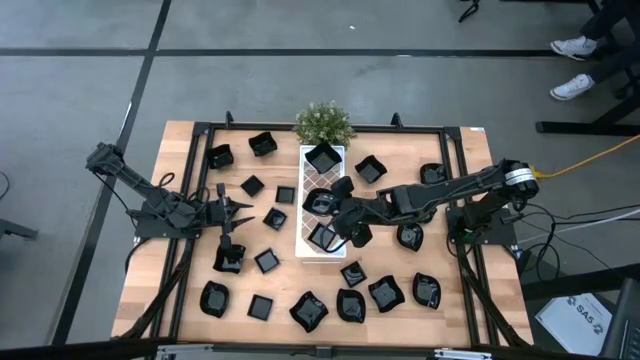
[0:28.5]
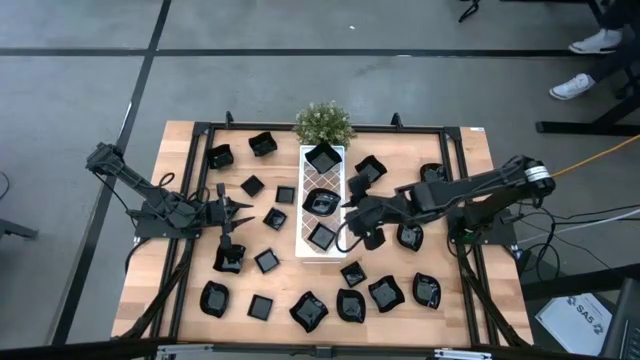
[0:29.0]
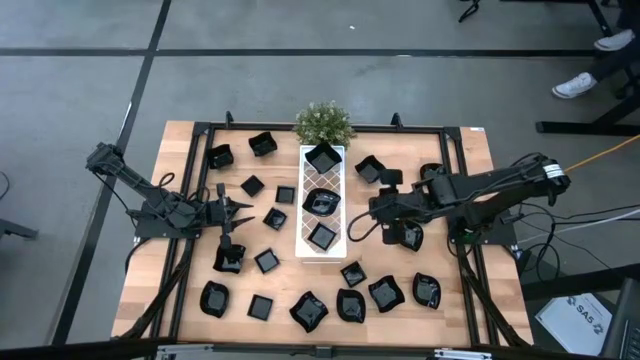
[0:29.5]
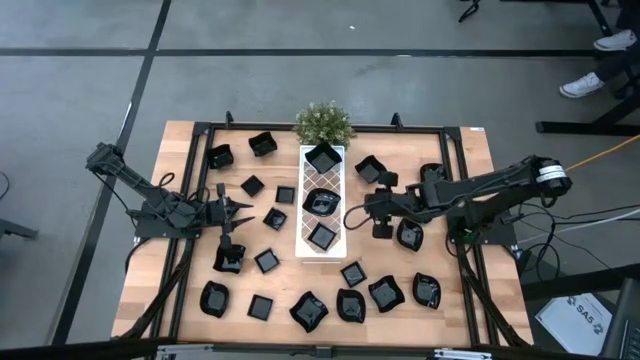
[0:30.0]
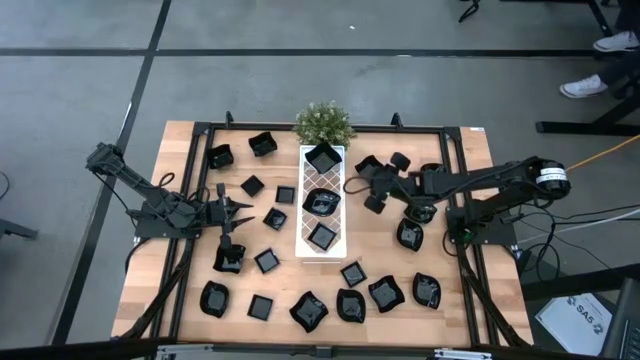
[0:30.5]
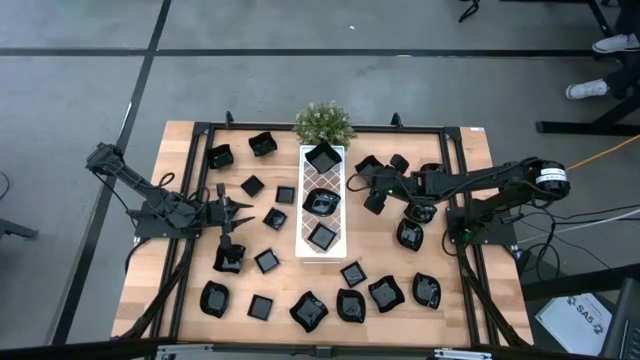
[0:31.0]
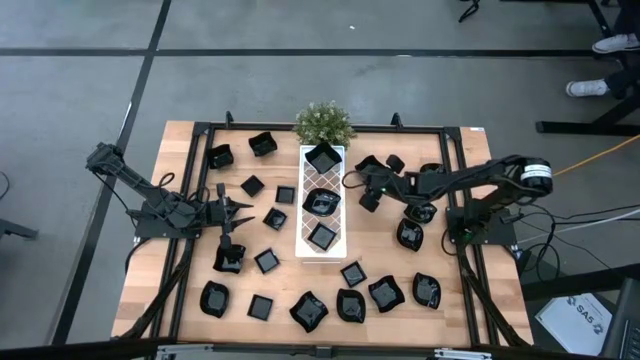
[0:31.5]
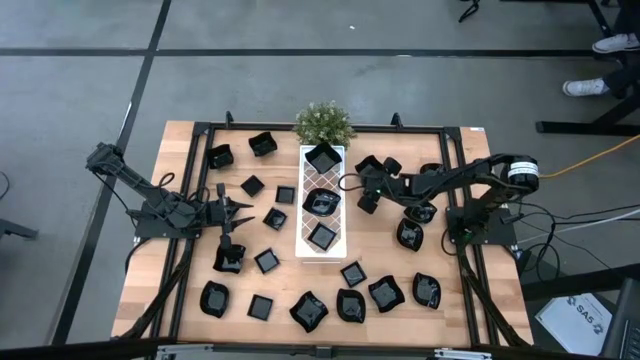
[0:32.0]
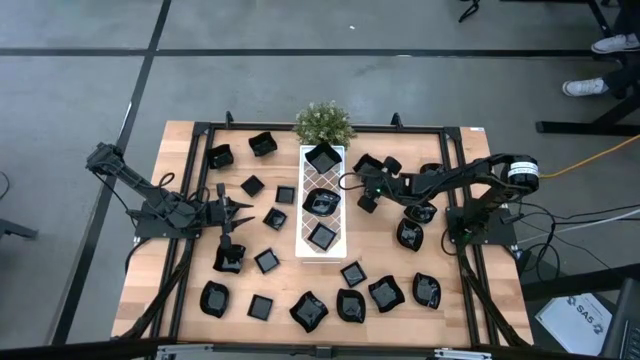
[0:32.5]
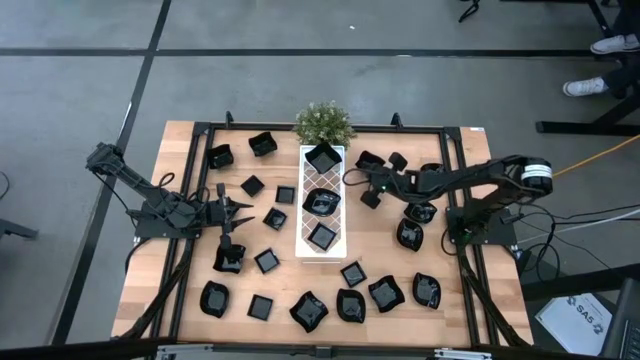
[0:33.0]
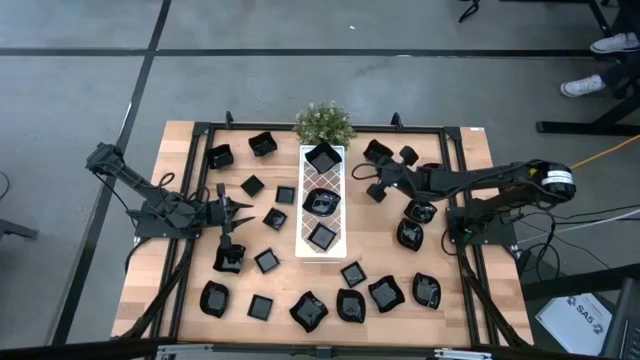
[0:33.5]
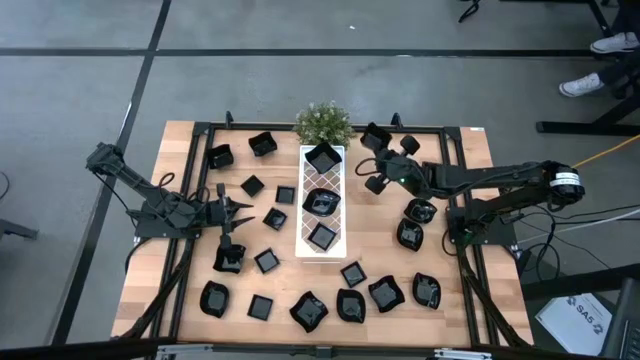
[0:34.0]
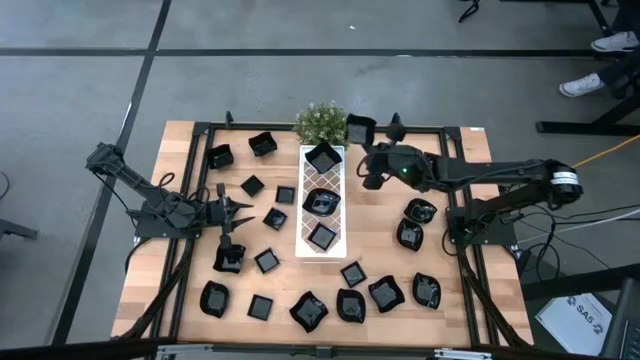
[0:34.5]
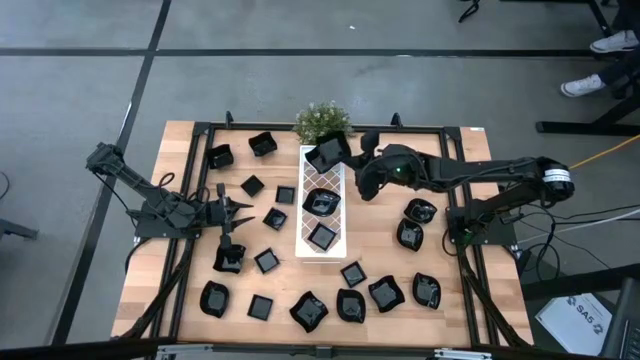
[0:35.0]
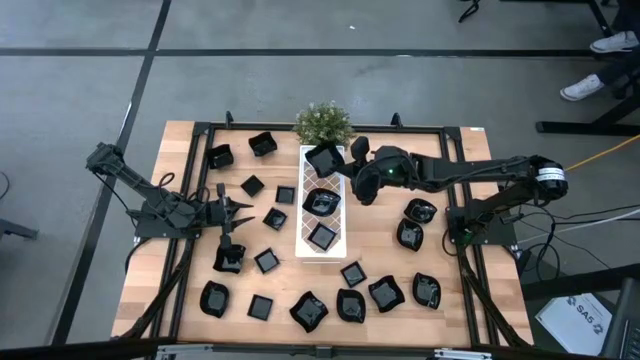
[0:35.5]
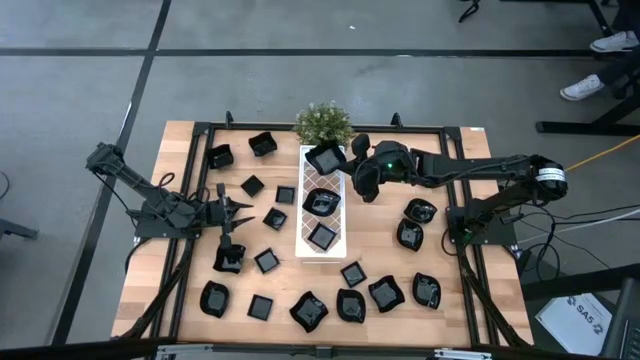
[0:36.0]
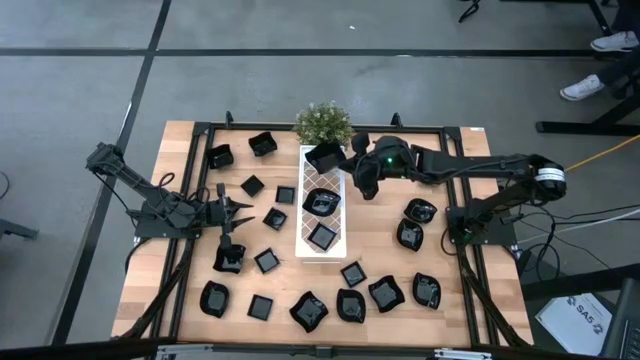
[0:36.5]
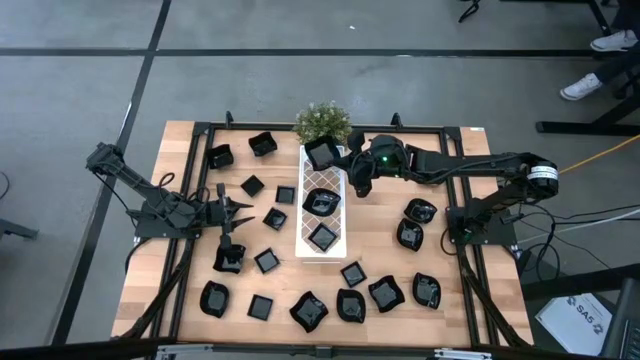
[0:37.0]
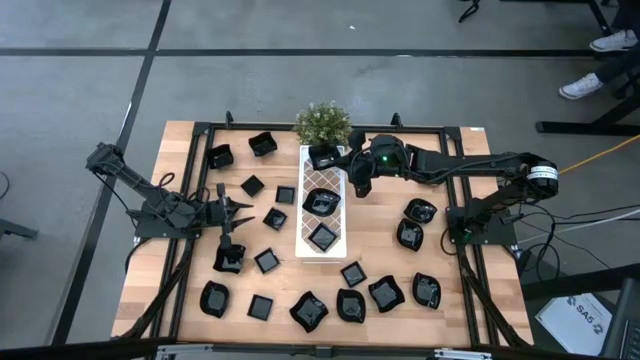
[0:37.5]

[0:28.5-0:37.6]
Task: Pick & Place Mini shaped plates
Stack the distorted square plate on top of the distorted square plate on the shelf

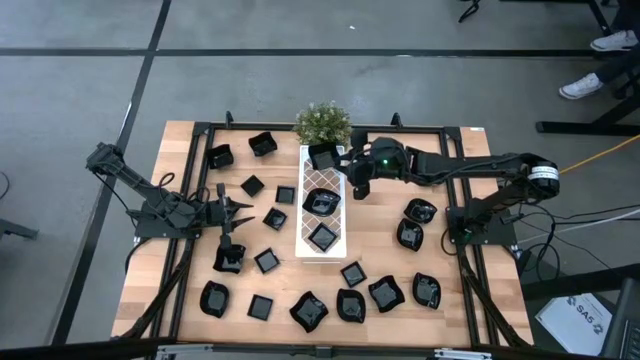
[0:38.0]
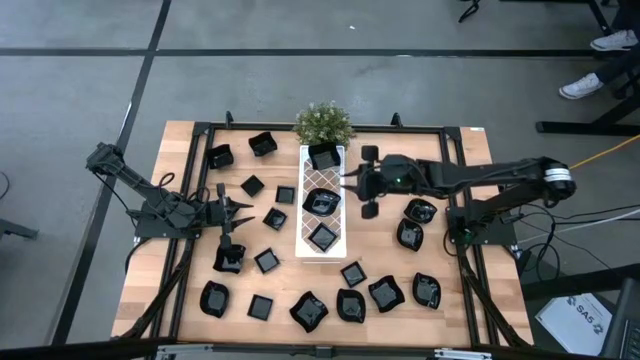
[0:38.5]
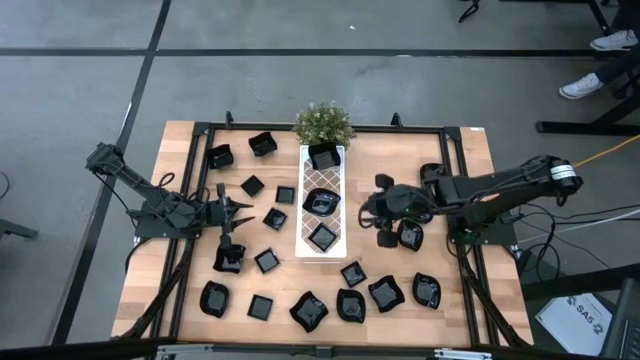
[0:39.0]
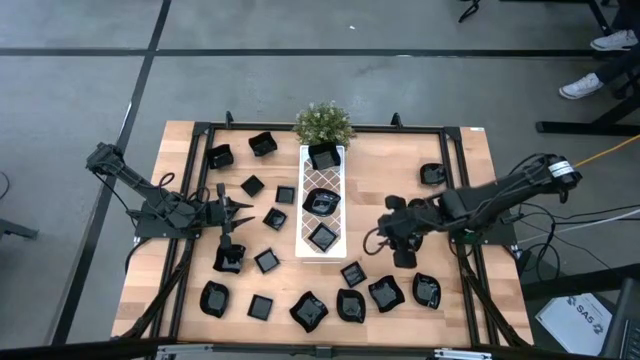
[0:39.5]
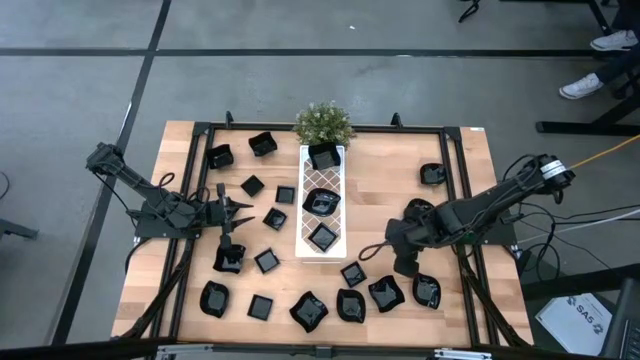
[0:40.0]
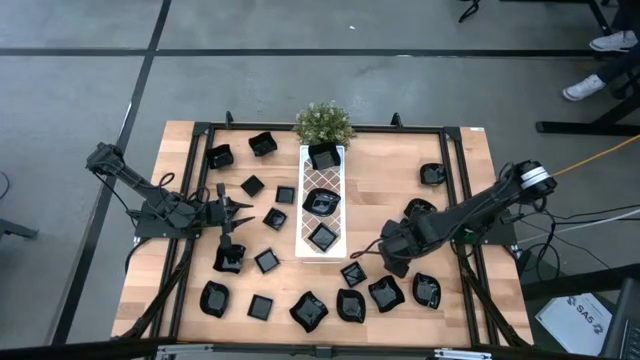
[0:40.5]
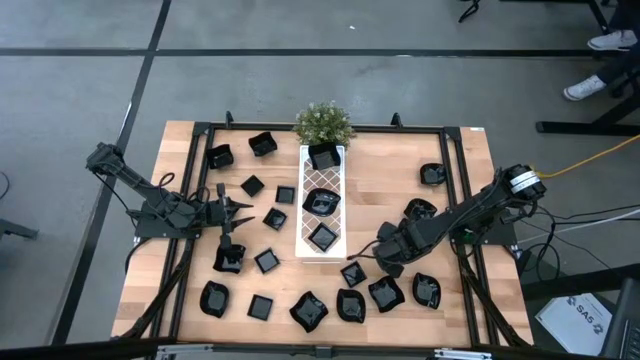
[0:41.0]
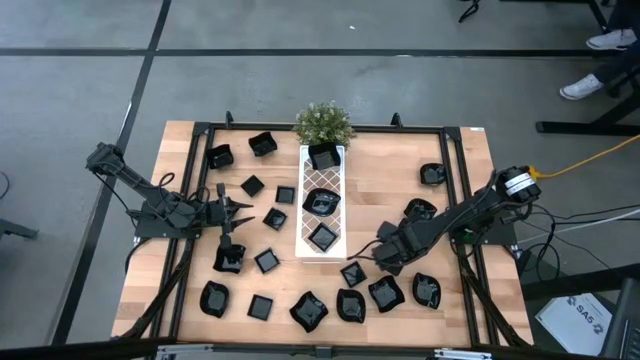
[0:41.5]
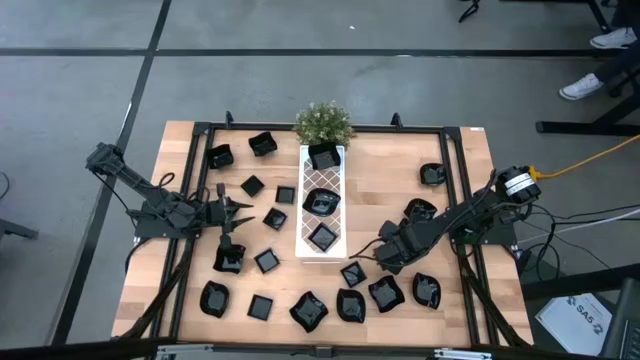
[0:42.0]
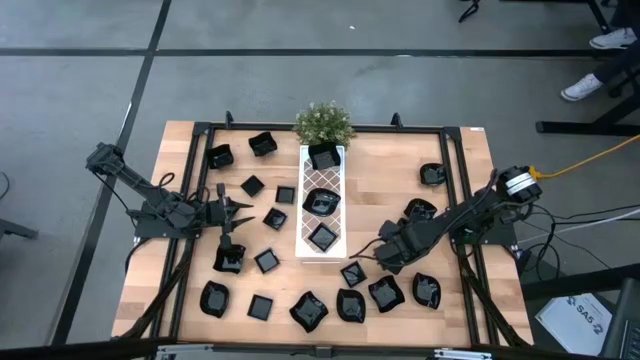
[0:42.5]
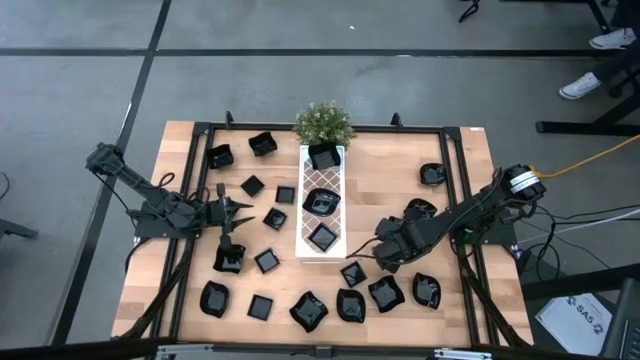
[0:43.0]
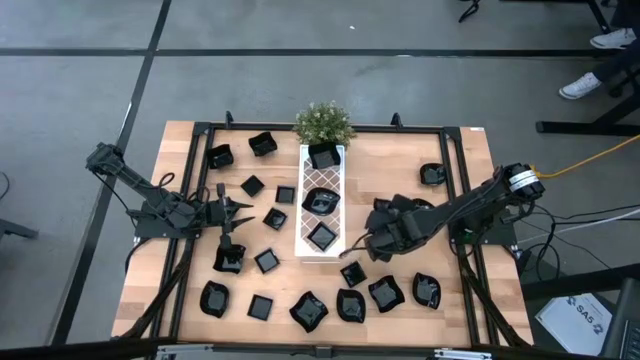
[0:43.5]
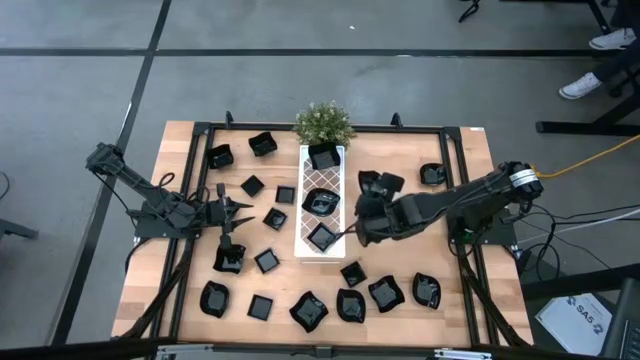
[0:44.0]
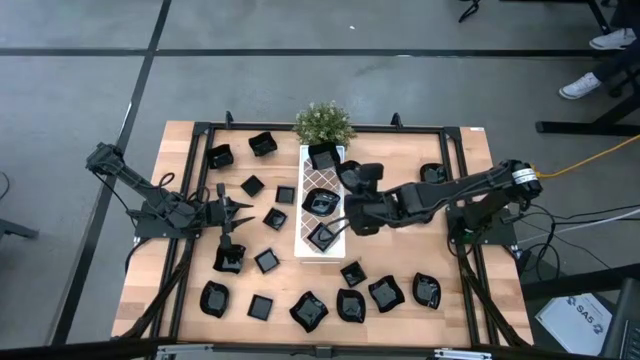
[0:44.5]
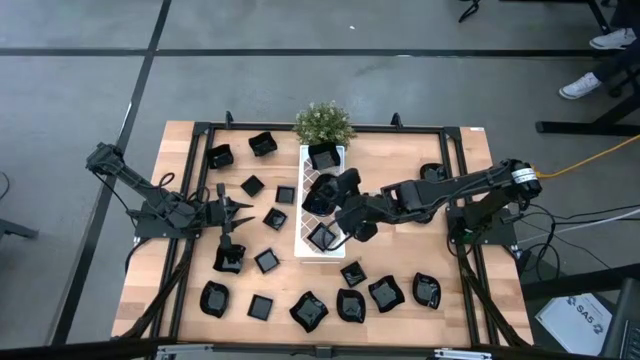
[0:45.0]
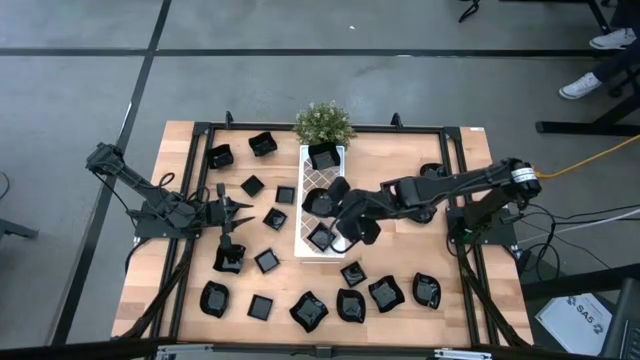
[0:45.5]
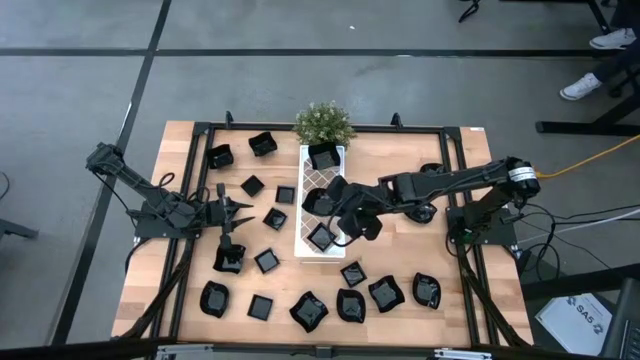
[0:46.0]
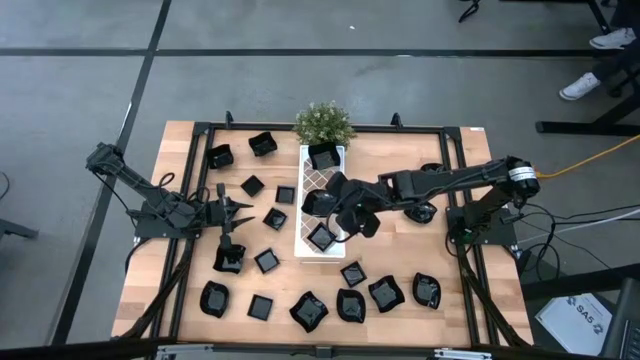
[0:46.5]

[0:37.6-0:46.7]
Stack the leaf shape plate on top of the leaf shape plate on the shelf

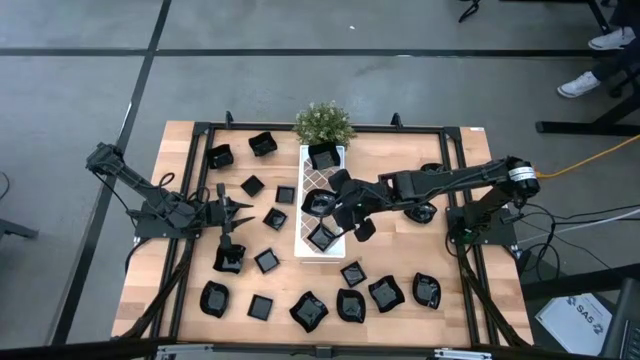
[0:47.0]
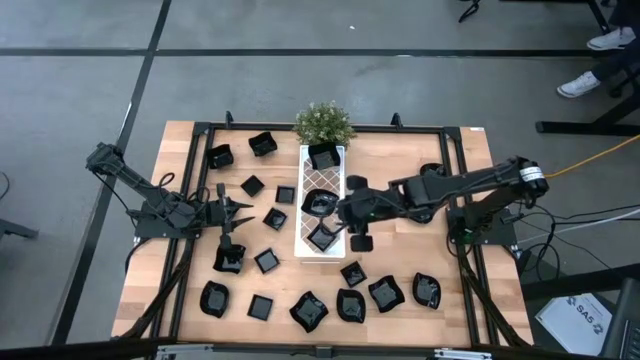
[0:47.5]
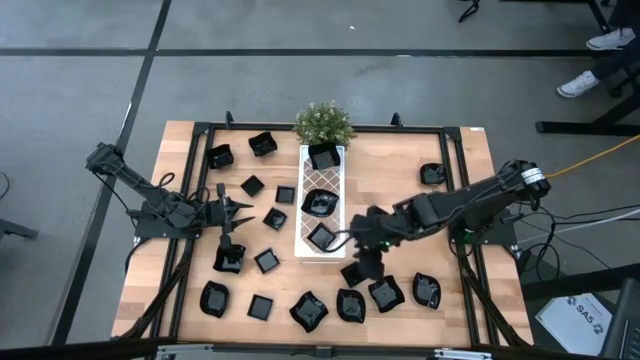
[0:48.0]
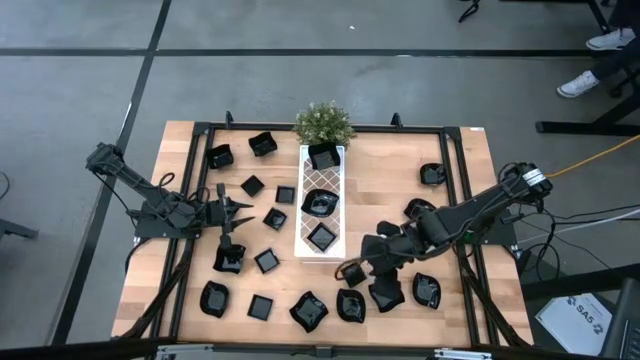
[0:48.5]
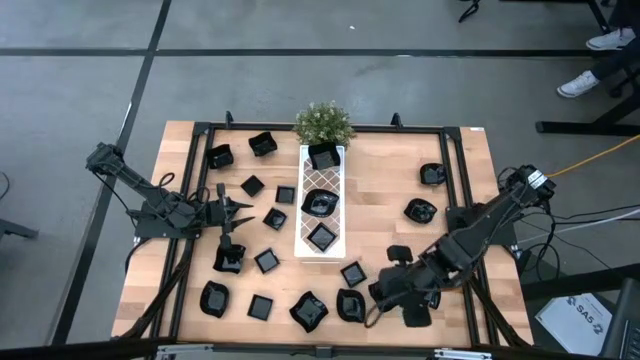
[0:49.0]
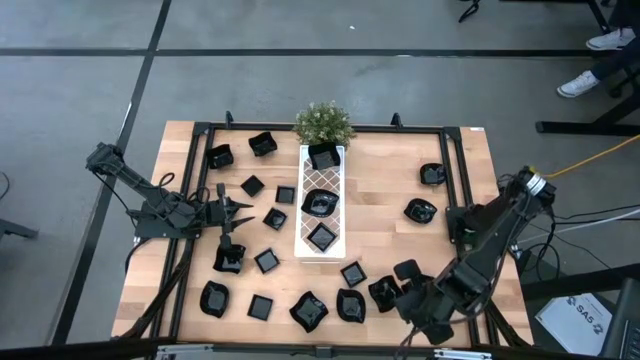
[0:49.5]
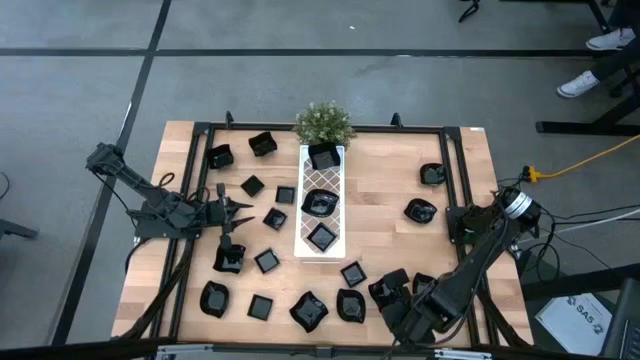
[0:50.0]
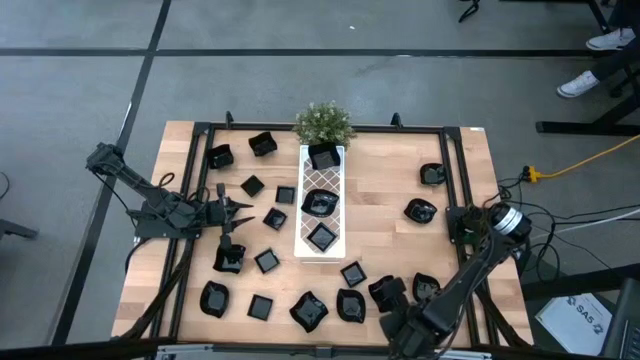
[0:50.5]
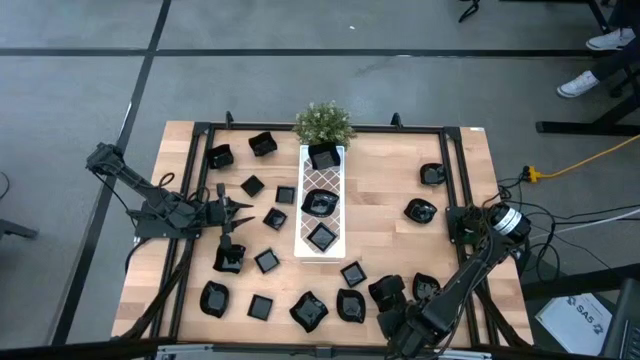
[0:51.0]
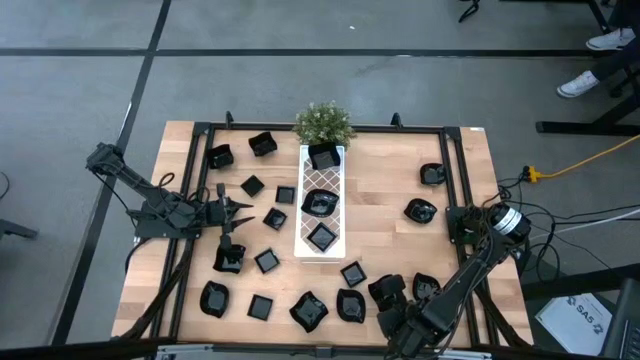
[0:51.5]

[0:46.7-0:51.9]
Stack the distorted square plate on top of the distorted square plate on the shelf
